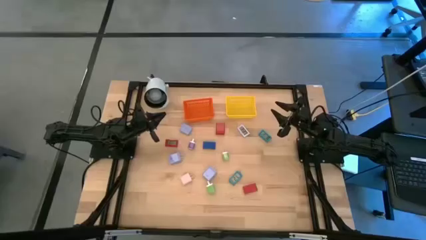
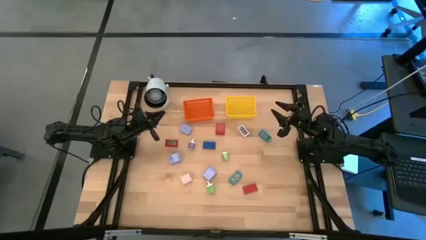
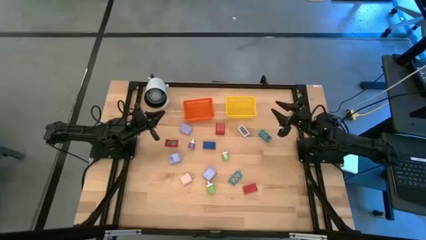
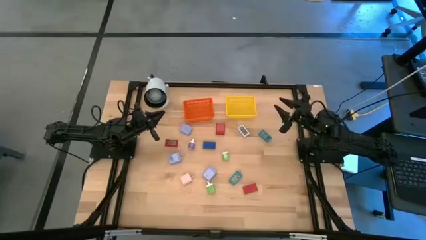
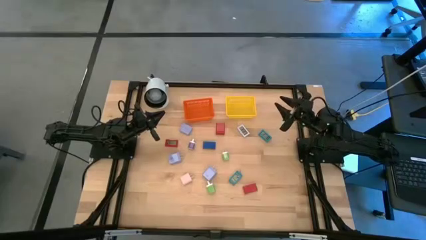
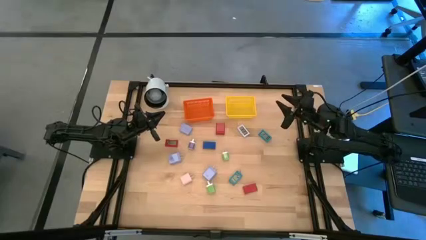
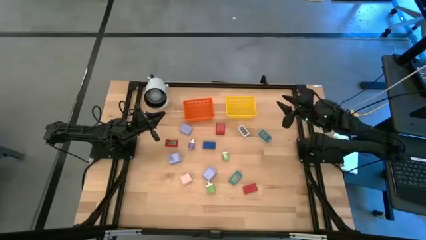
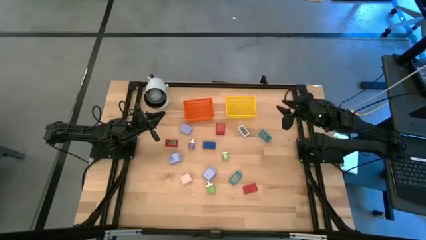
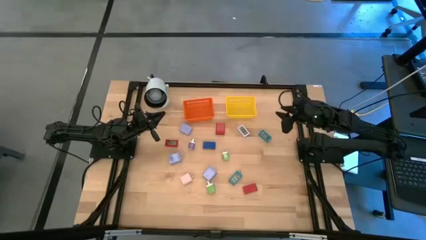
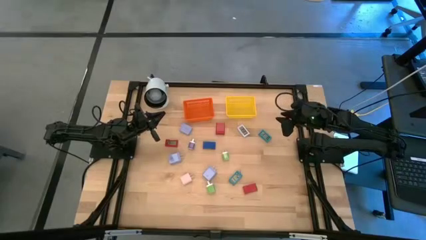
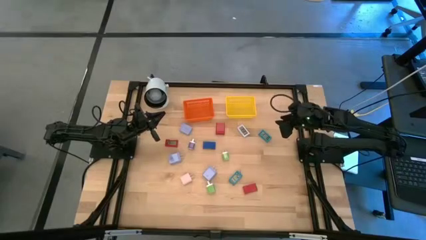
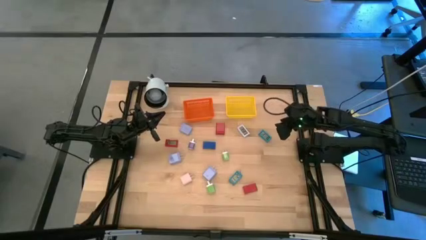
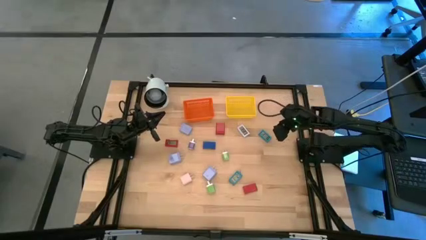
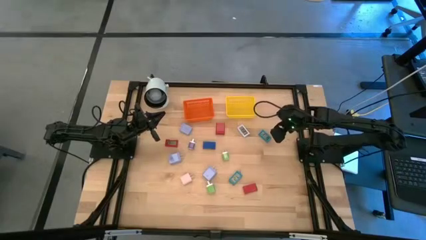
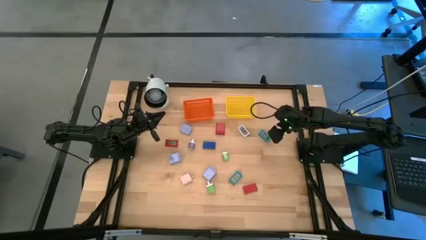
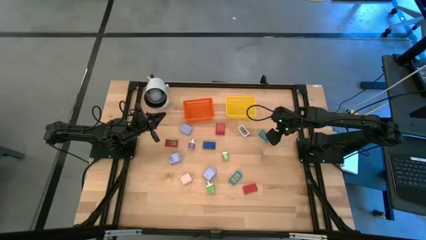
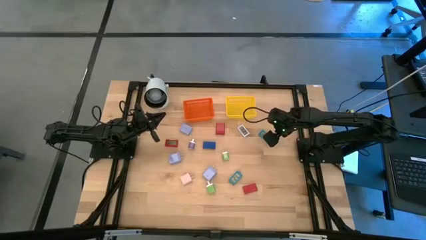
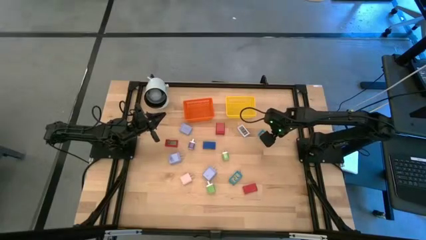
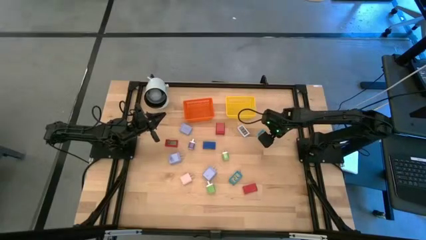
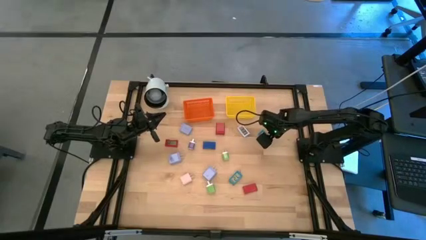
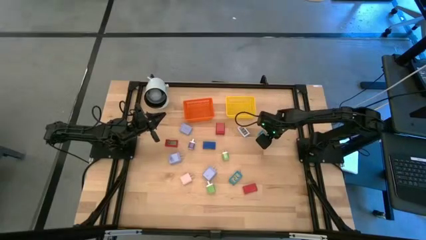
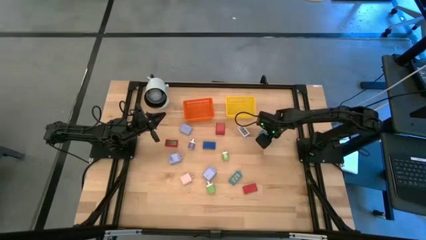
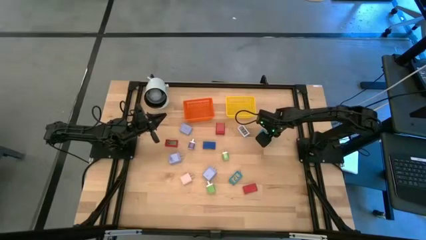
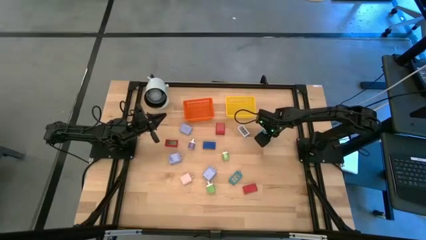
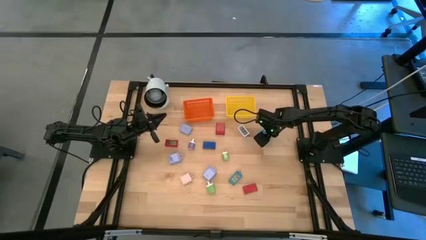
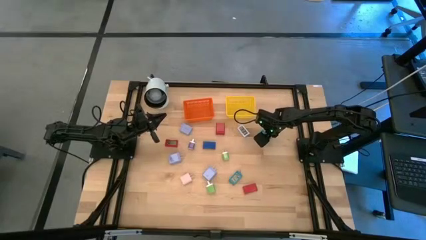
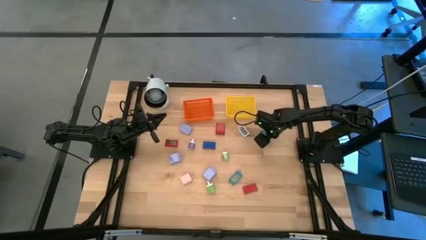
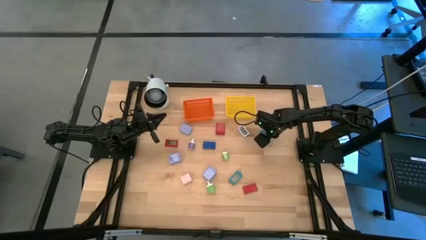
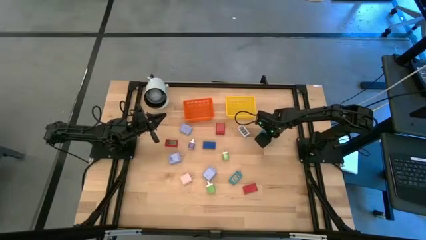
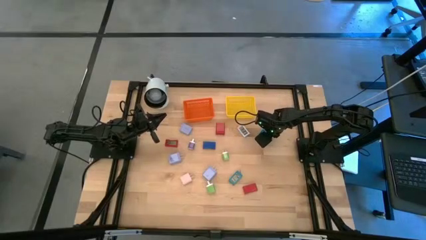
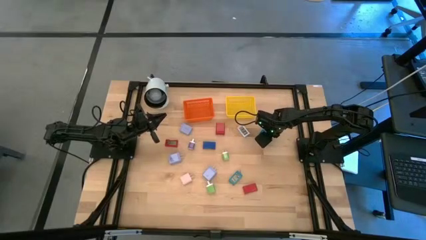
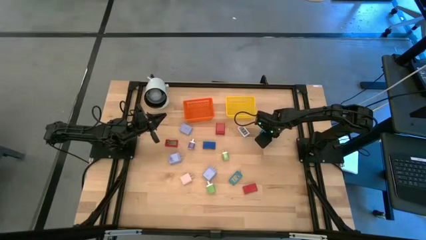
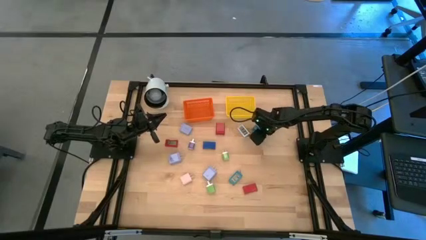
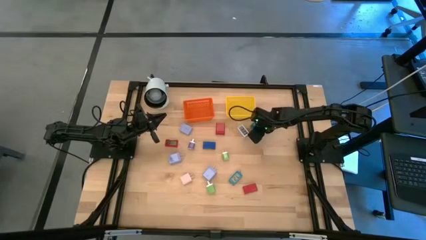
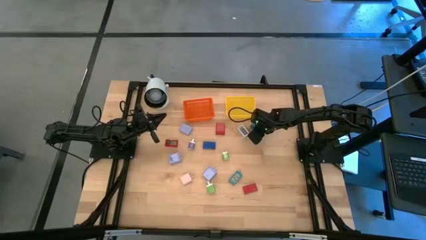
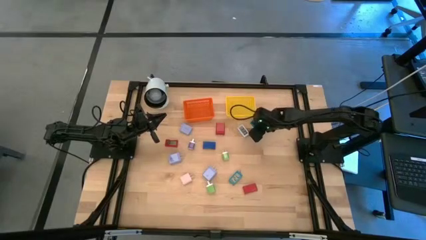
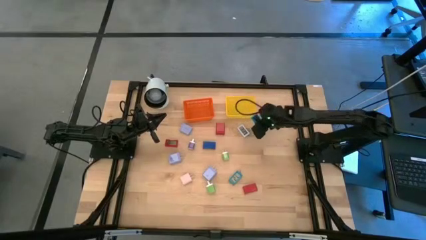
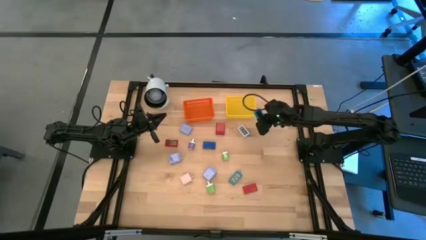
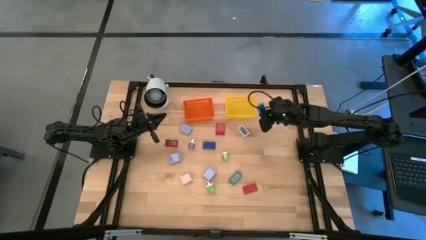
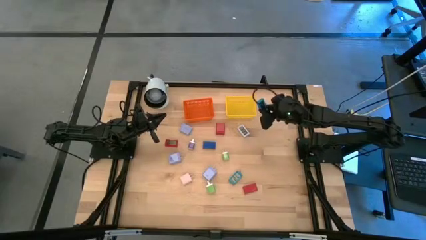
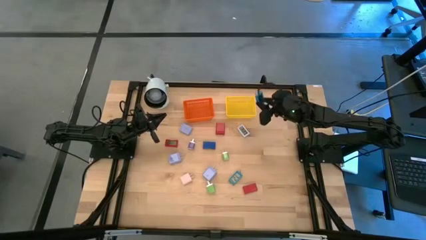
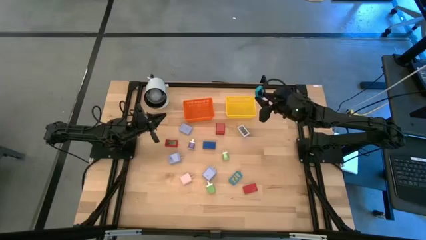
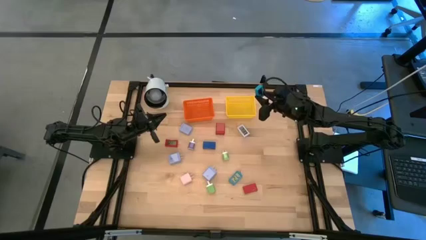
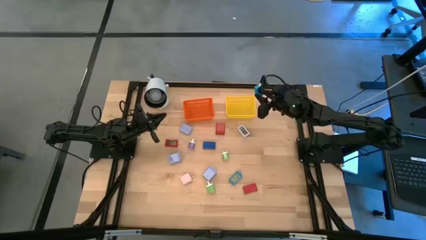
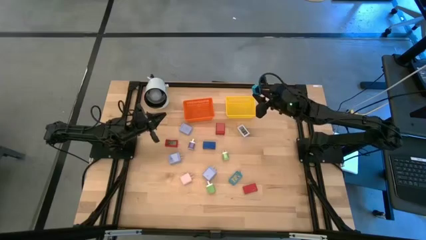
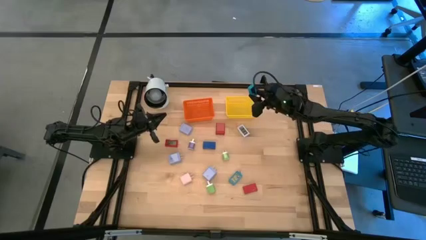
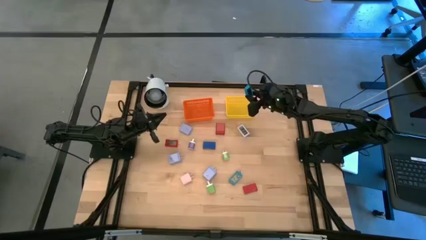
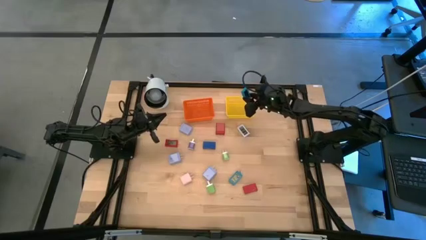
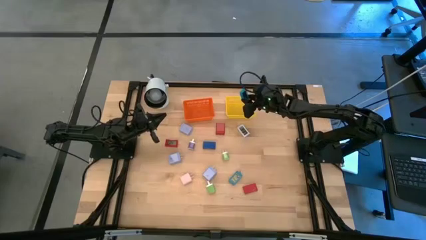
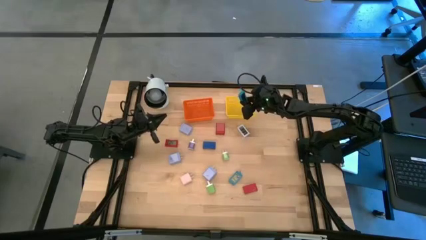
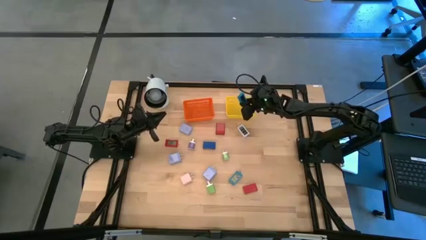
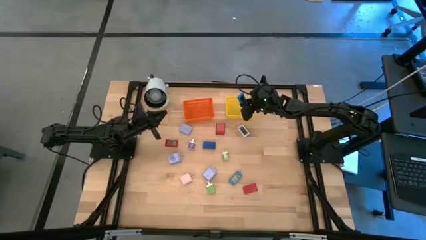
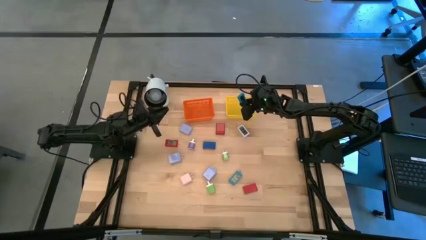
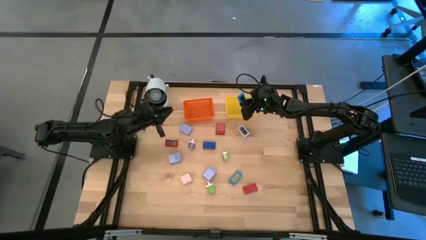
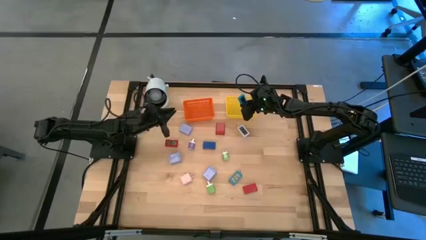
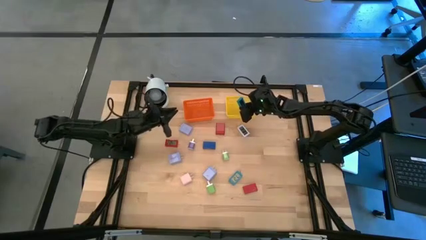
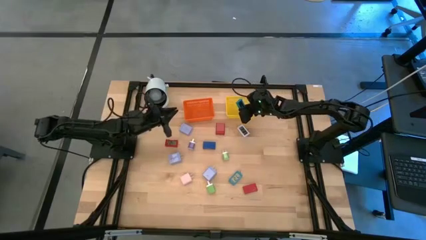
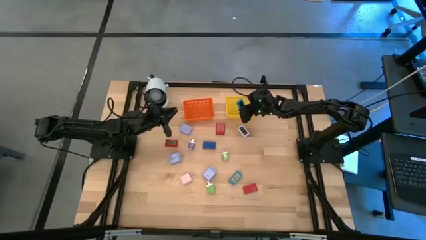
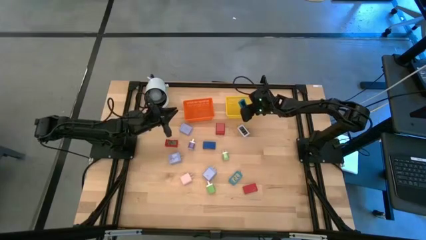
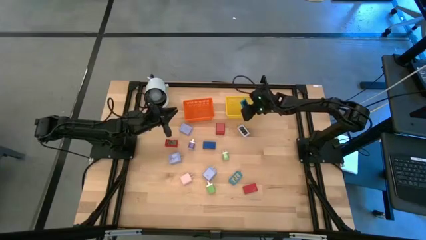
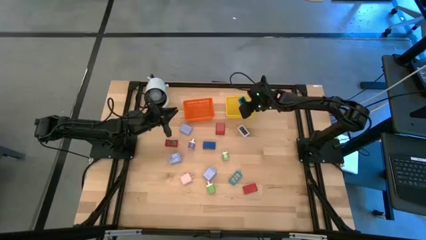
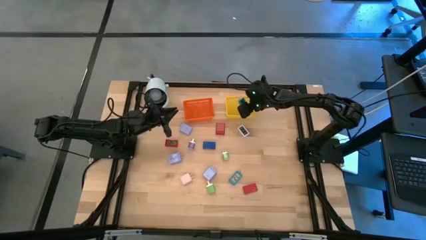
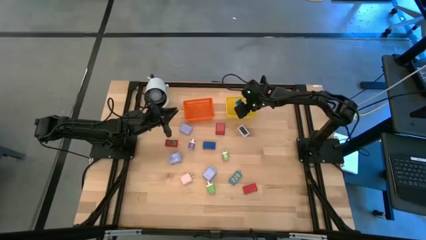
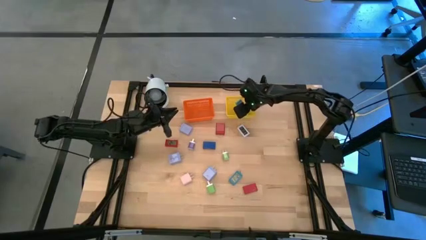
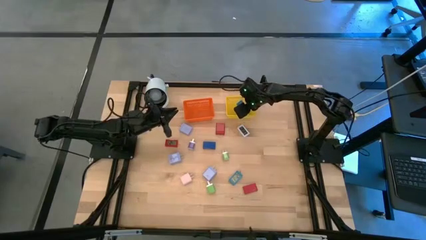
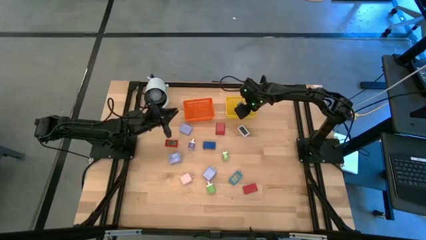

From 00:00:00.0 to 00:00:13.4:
Task: Pick & Place Office items
Put the top blue digital clock into the yellow bin
